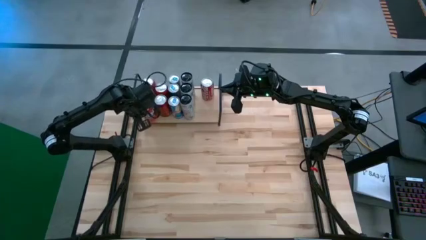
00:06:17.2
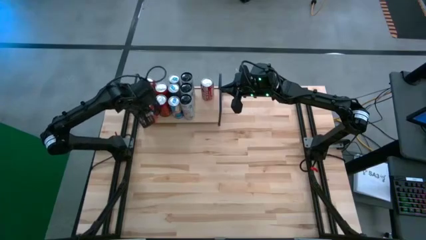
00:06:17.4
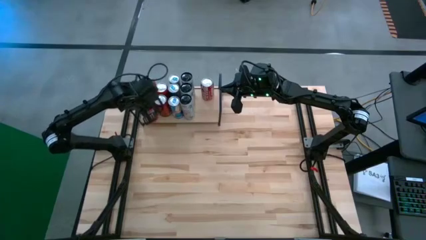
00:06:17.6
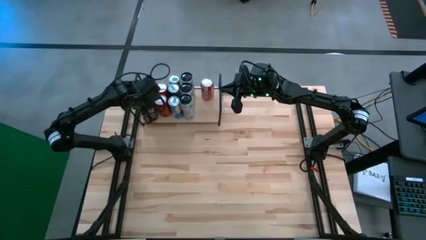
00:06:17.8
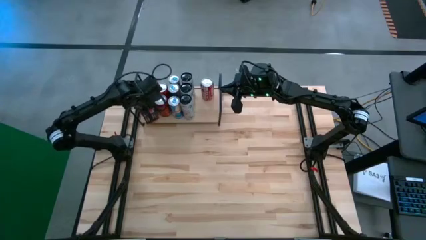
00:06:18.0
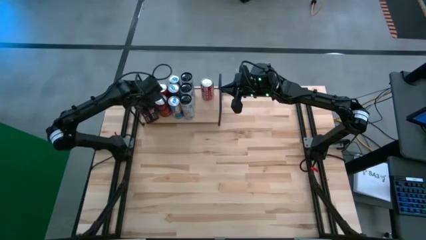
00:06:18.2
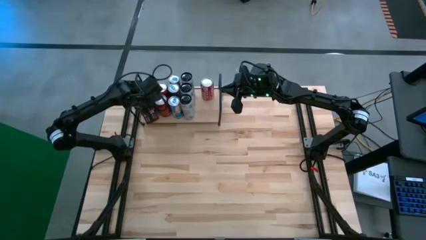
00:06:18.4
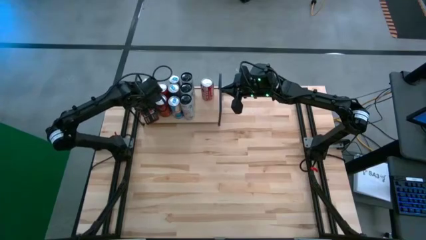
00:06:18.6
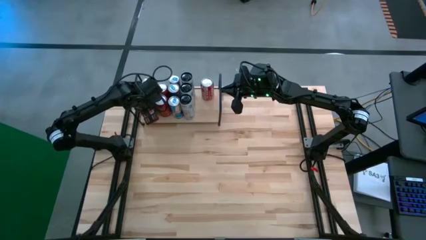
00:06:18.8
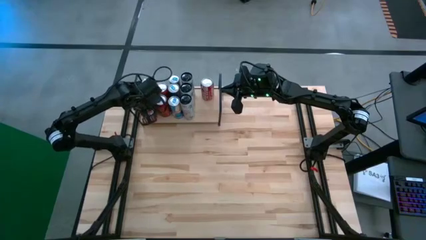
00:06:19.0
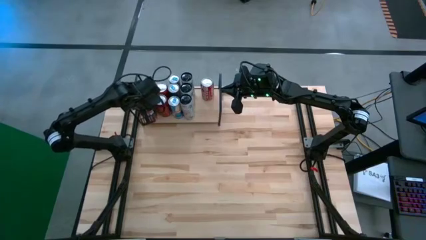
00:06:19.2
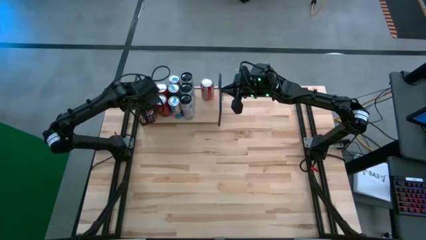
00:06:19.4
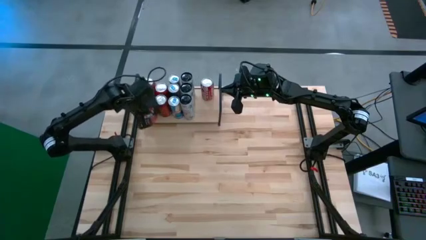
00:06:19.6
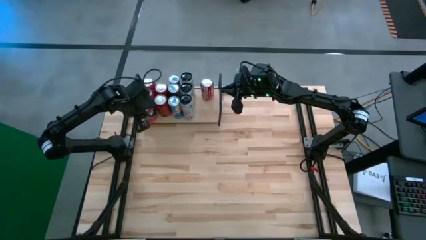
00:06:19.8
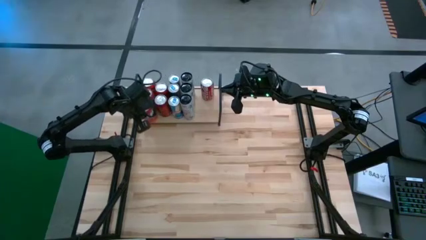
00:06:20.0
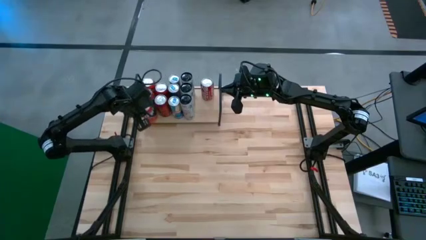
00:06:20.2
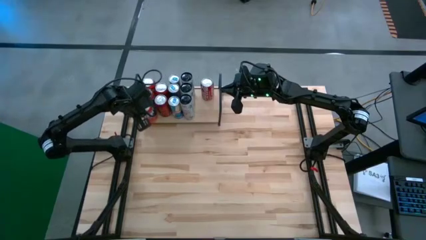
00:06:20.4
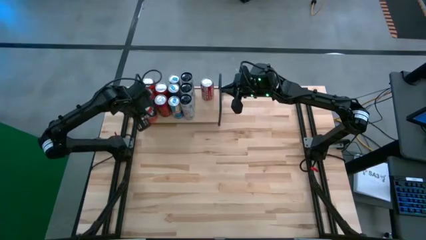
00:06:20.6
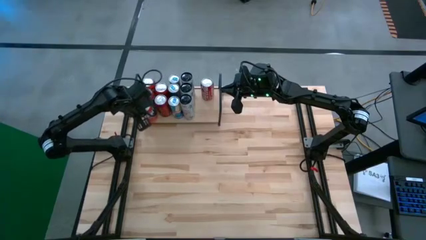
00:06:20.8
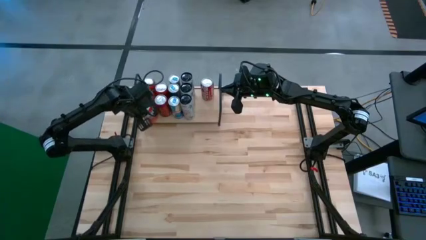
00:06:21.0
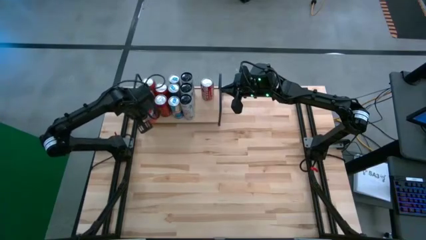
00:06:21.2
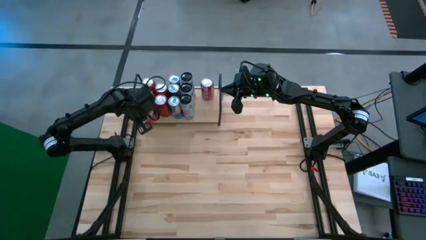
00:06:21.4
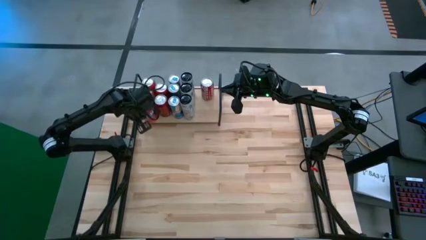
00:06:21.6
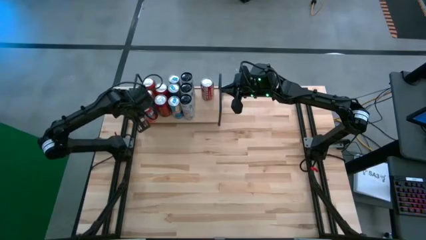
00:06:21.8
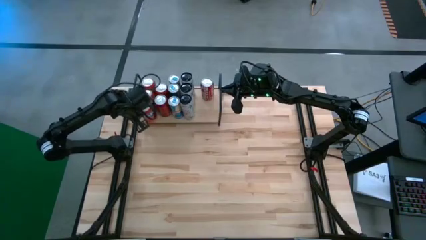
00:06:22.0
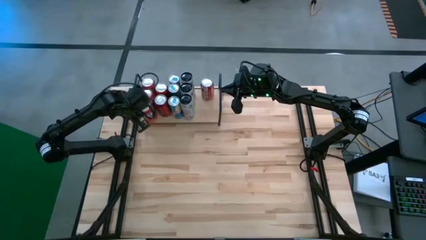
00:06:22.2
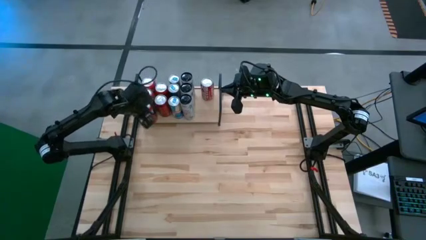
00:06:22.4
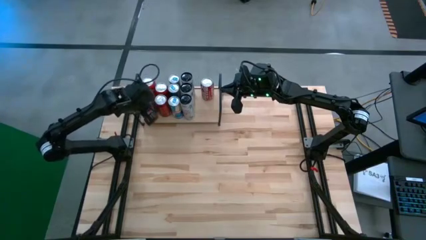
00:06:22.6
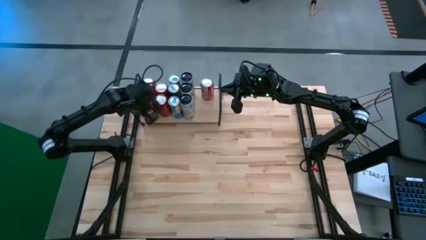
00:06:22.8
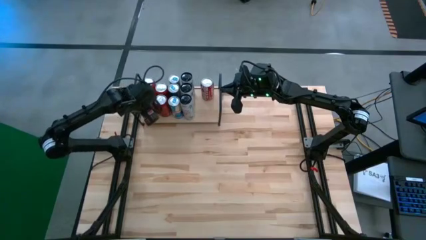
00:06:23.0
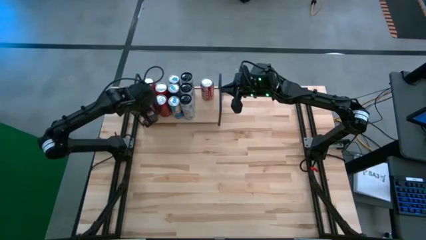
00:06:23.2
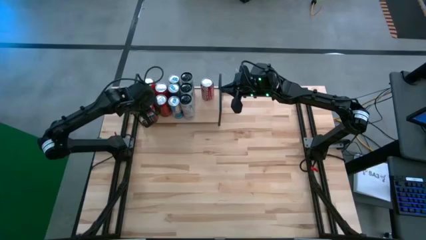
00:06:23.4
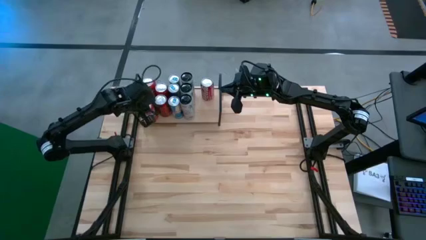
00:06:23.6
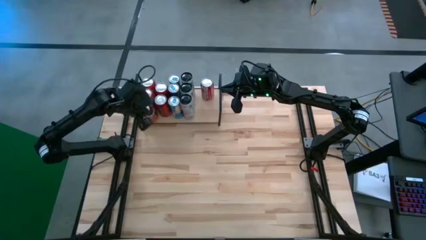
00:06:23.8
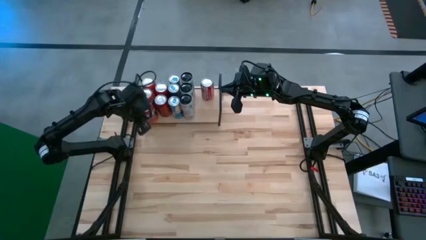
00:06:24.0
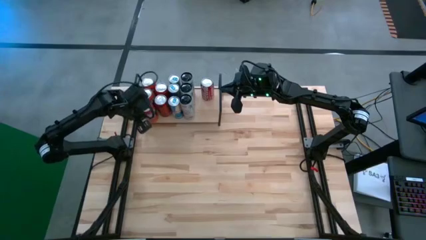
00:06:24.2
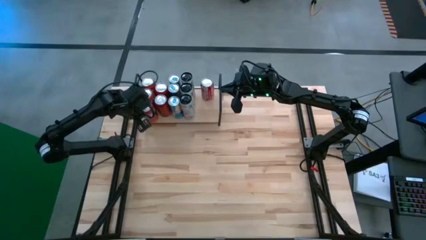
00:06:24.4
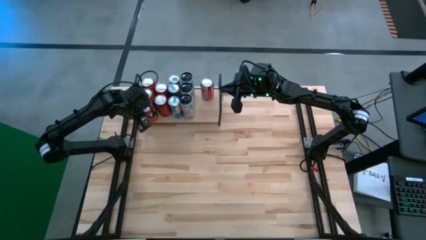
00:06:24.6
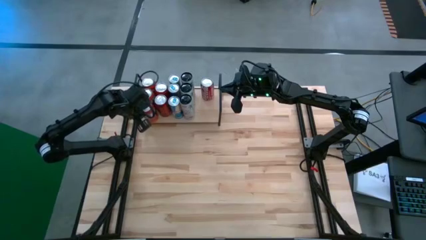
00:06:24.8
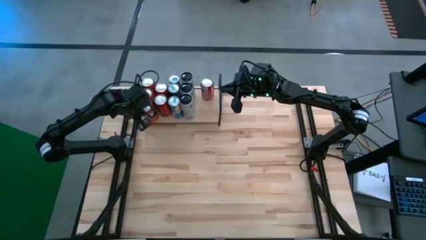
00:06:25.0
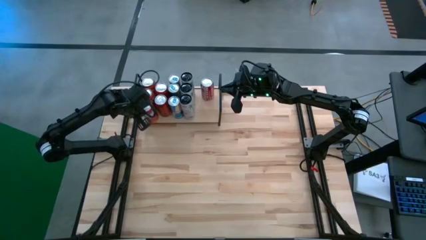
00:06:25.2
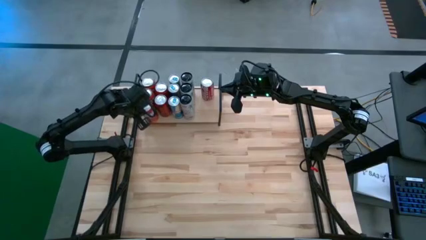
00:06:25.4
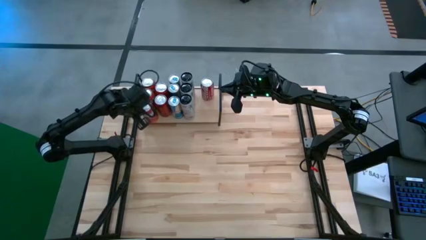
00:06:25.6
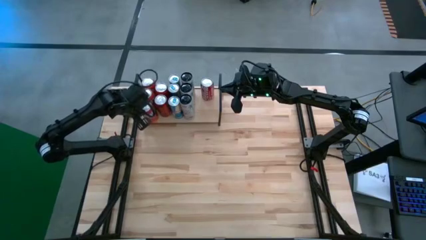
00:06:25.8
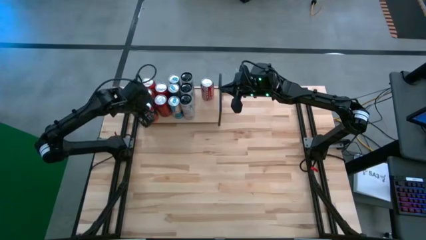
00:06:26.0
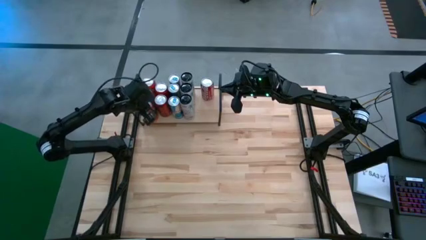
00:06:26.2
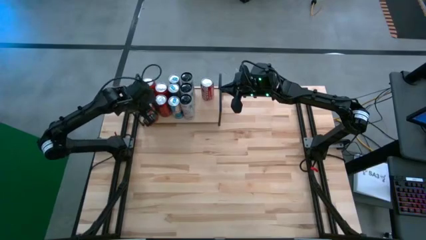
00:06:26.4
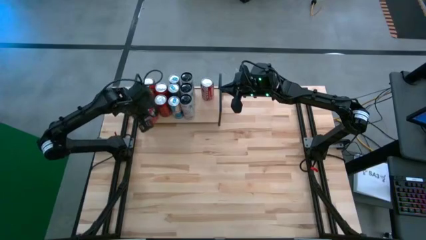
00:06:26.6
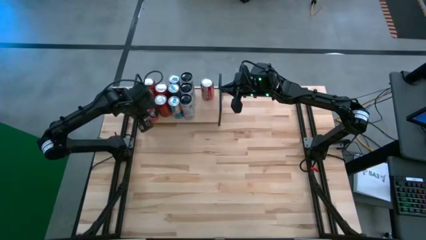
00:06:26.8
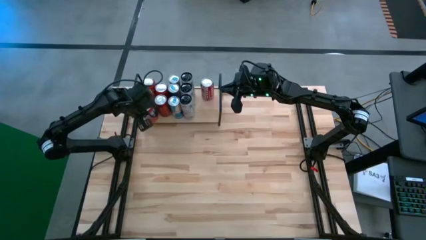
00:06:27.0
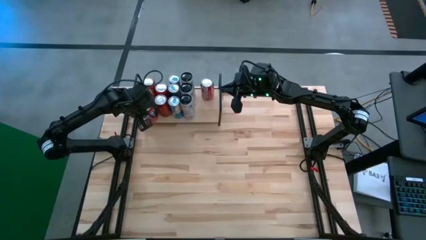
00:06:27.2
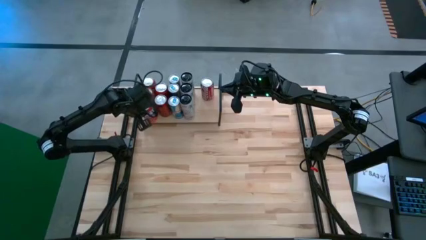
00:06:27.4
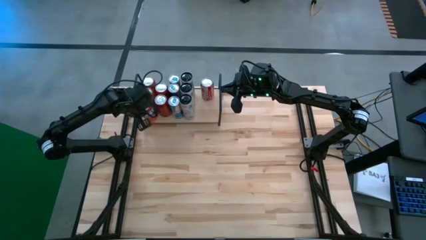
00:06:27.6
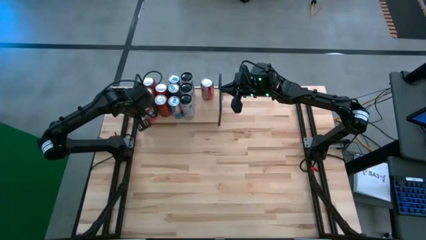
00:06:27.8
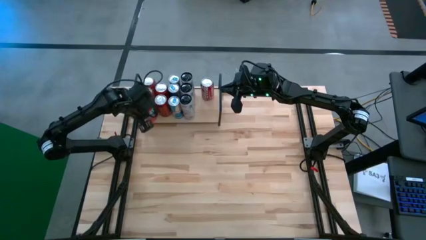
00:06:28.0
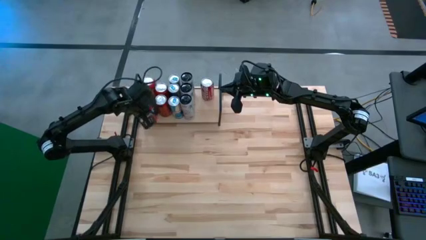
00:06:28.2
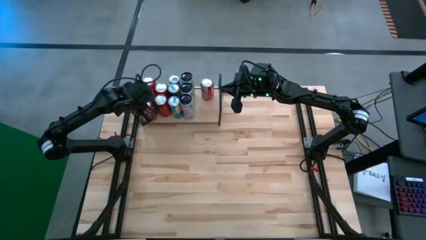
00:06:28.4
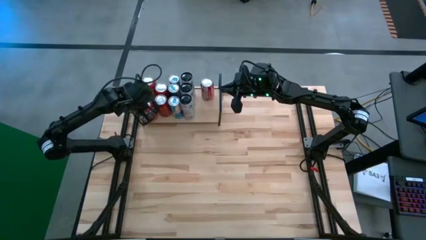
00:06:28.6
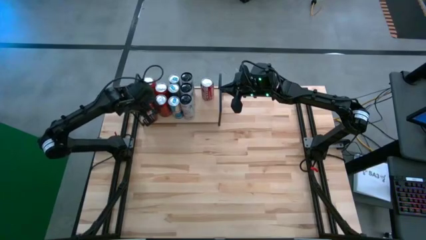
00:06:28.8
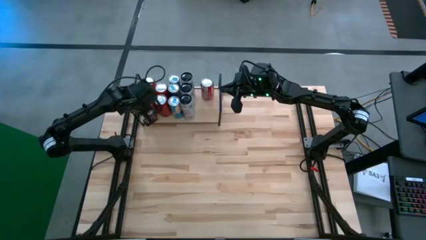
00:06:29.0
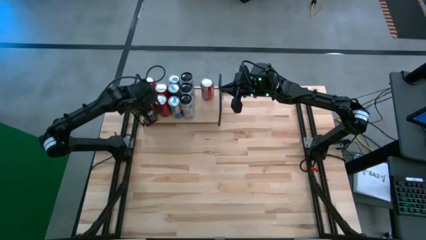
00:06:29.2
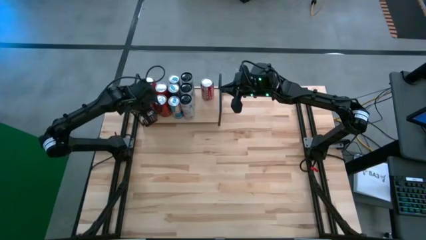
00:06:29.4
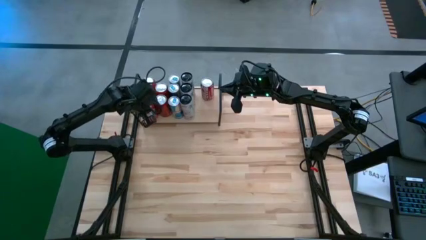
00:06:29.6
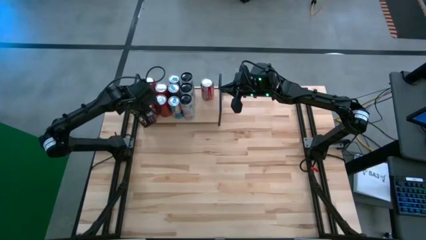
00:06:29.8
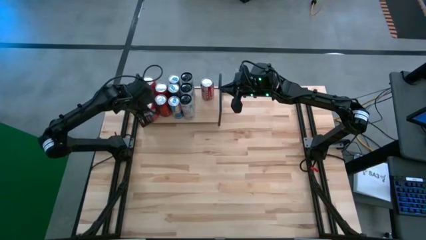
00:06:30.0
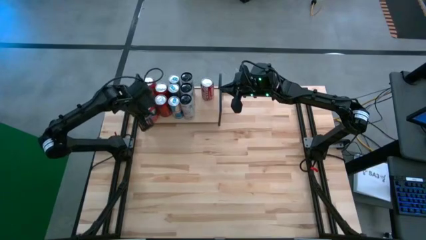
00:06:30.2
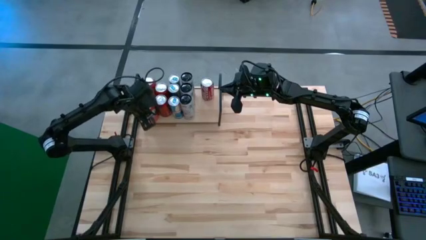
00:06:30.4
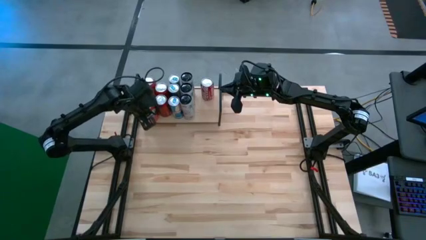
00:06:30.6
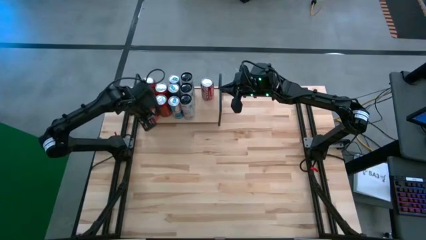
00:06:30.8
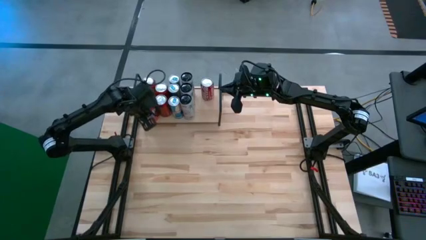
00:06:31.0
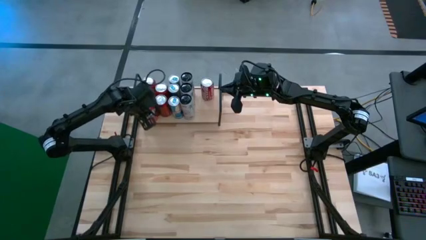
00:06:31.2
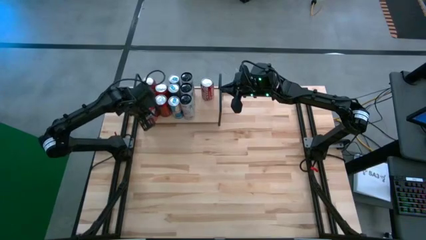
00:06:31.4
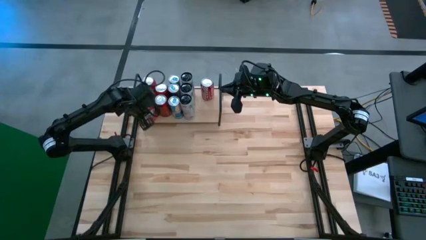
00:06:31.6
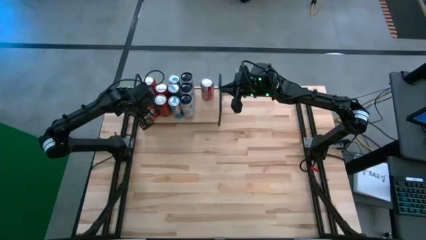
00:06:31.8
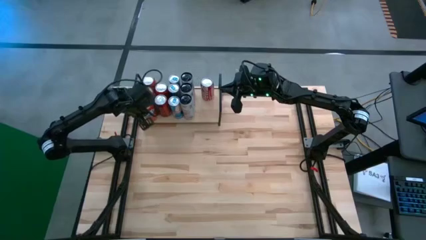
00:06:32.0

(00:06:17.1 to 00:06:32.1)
Task: Place canned beverage on shelf
Put the orange soda can on the shelf aligned with the other orange soda cans
